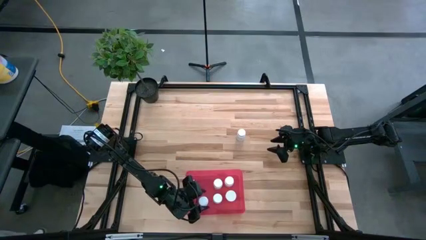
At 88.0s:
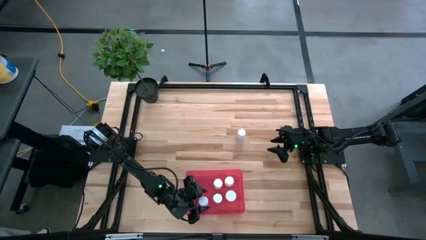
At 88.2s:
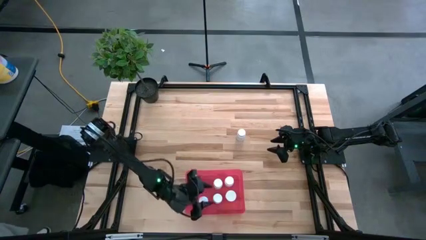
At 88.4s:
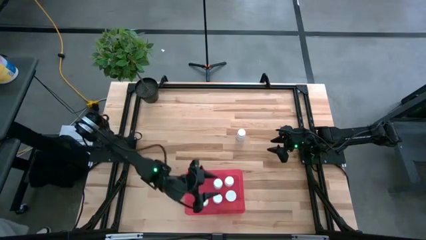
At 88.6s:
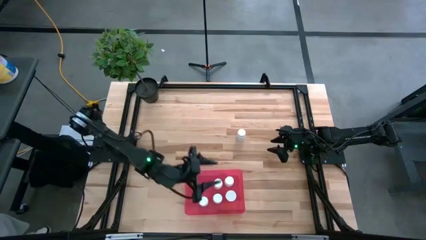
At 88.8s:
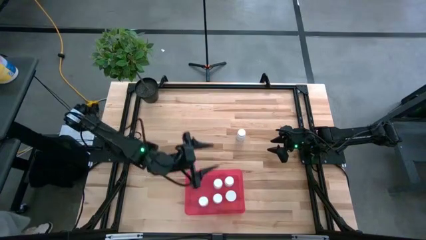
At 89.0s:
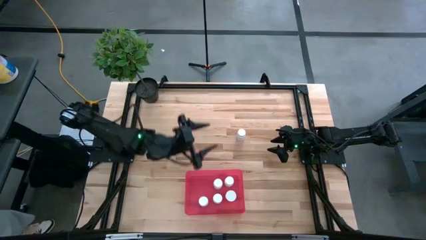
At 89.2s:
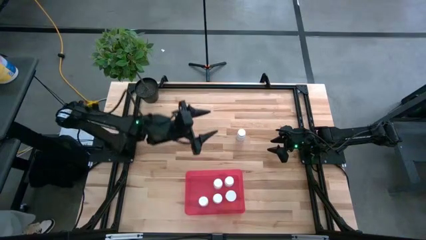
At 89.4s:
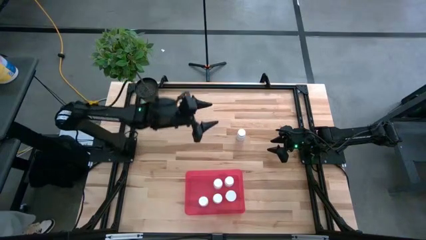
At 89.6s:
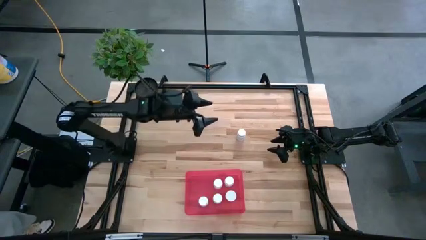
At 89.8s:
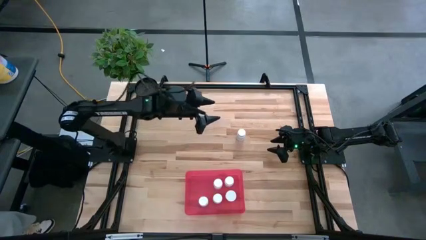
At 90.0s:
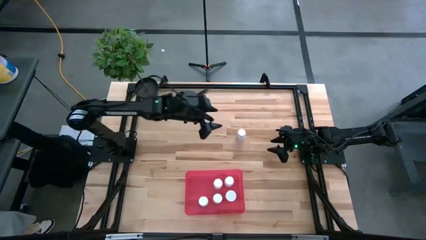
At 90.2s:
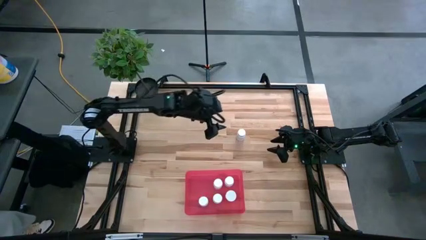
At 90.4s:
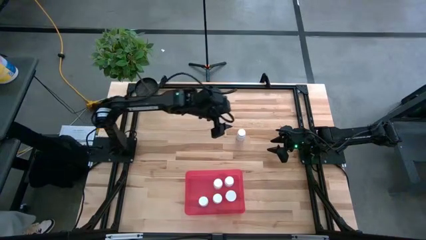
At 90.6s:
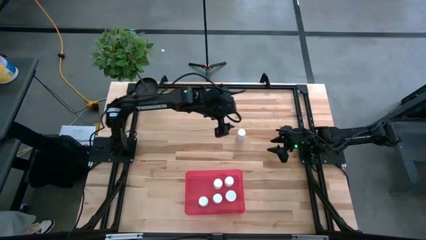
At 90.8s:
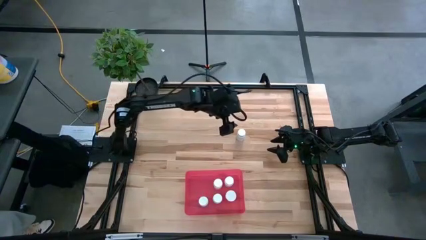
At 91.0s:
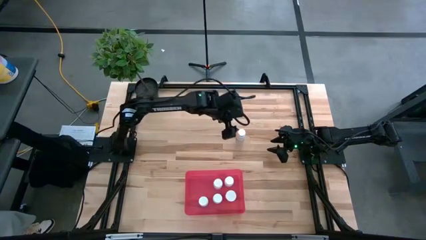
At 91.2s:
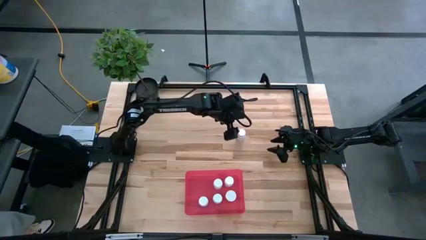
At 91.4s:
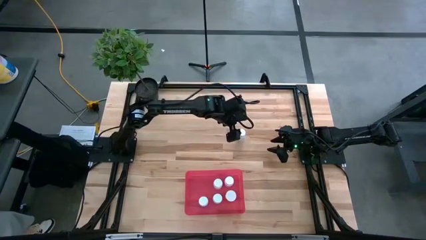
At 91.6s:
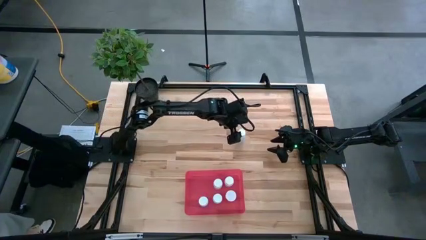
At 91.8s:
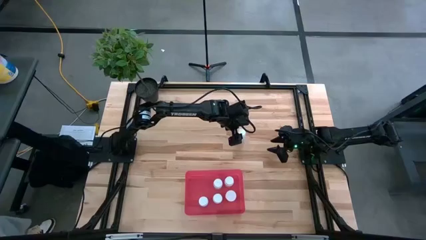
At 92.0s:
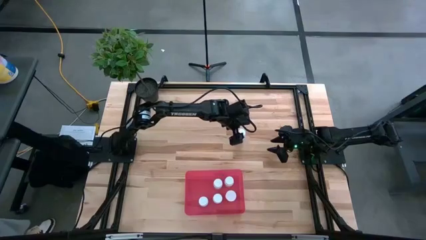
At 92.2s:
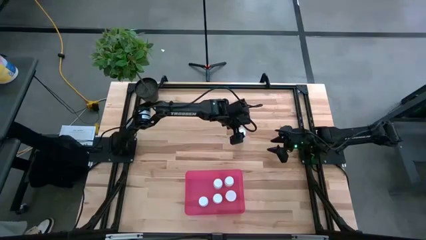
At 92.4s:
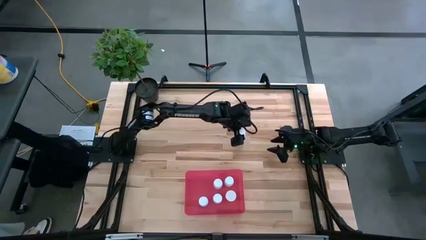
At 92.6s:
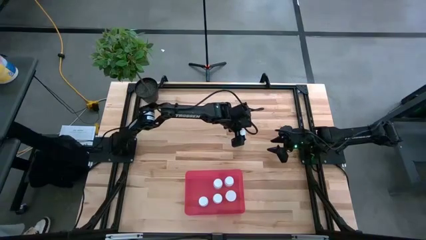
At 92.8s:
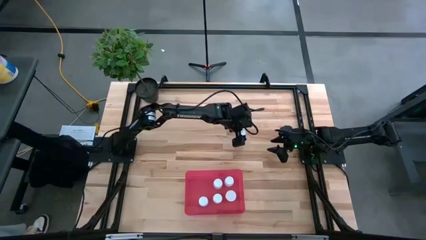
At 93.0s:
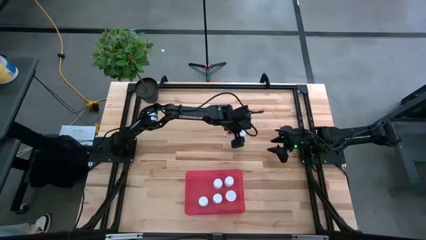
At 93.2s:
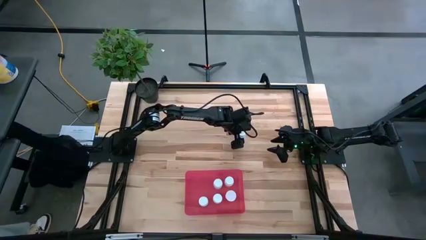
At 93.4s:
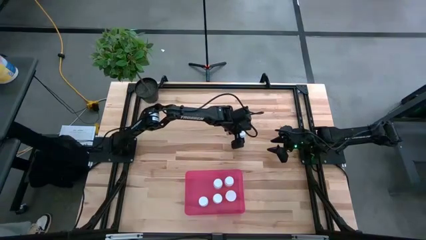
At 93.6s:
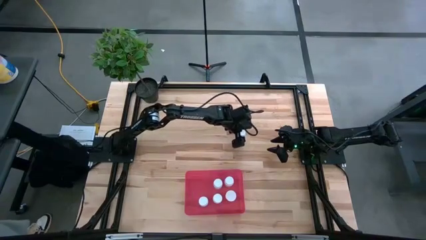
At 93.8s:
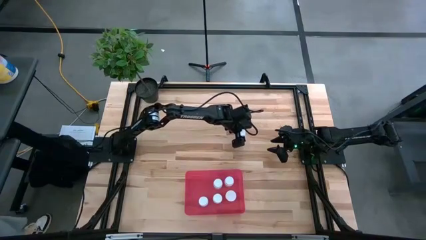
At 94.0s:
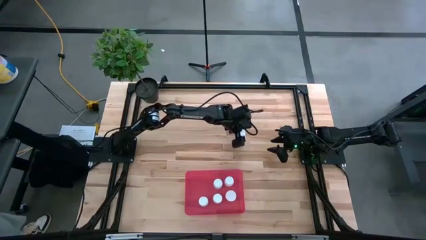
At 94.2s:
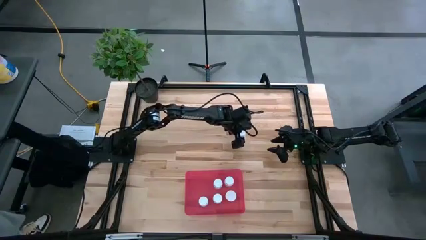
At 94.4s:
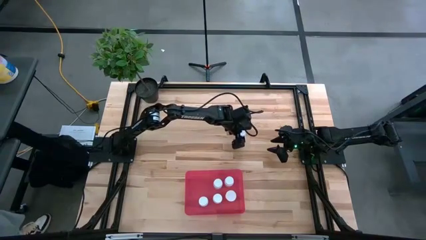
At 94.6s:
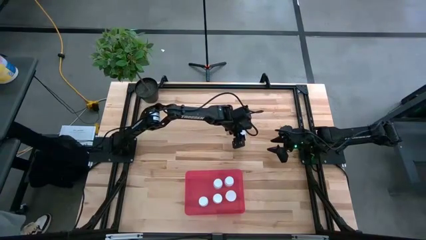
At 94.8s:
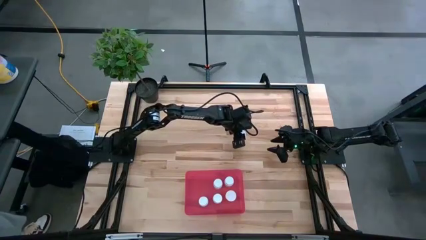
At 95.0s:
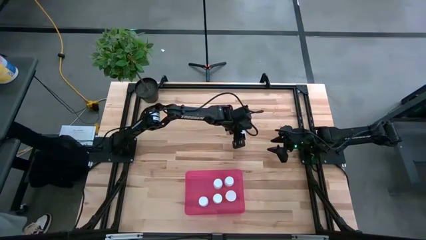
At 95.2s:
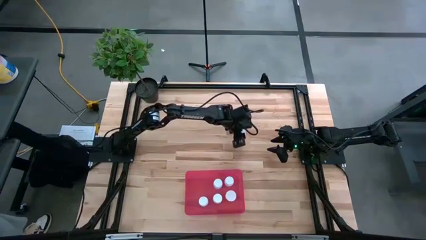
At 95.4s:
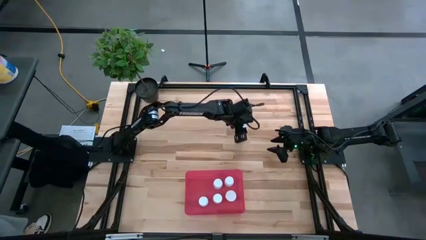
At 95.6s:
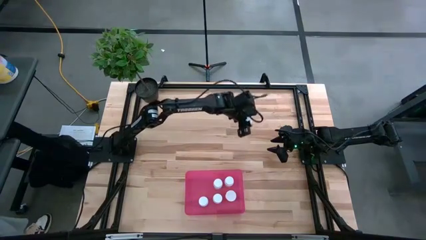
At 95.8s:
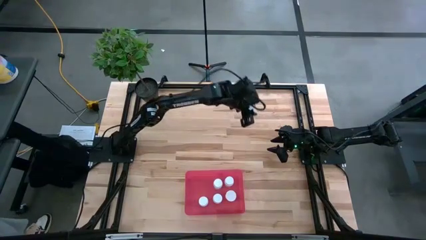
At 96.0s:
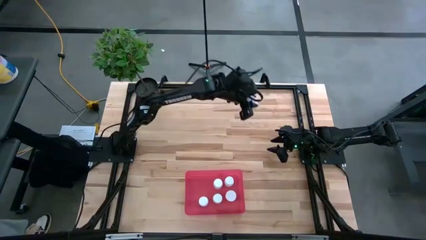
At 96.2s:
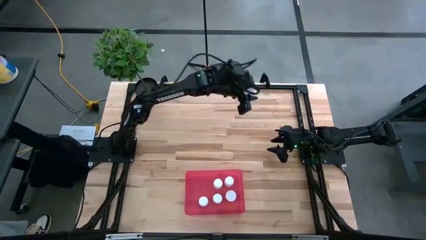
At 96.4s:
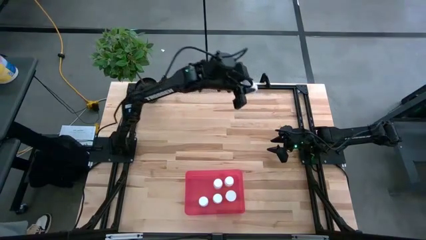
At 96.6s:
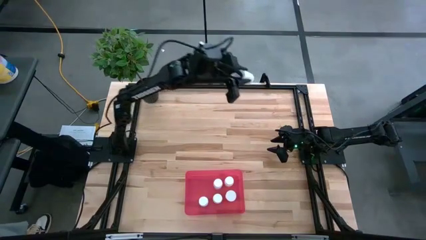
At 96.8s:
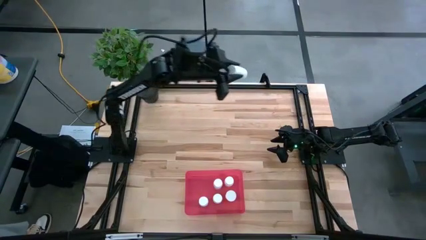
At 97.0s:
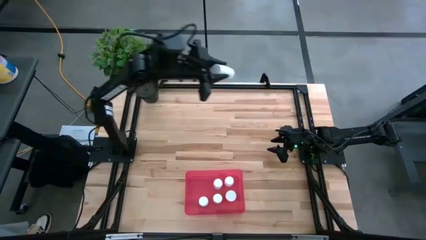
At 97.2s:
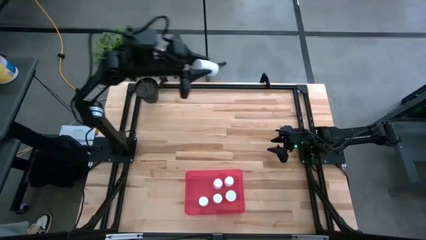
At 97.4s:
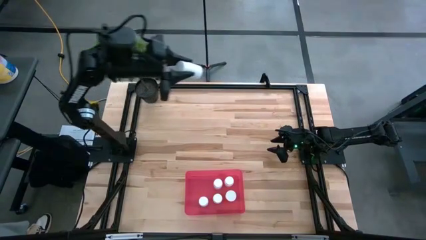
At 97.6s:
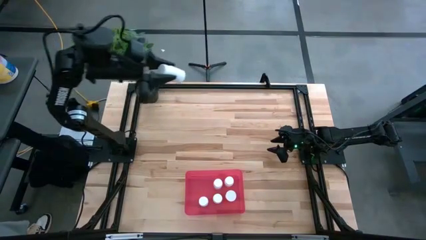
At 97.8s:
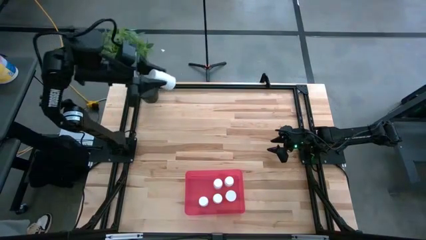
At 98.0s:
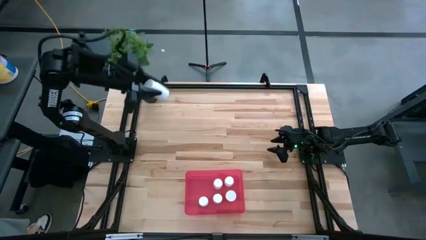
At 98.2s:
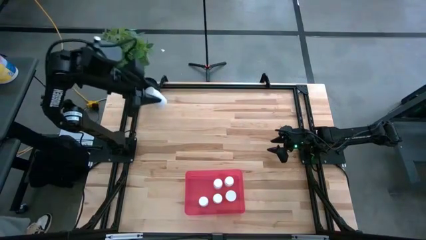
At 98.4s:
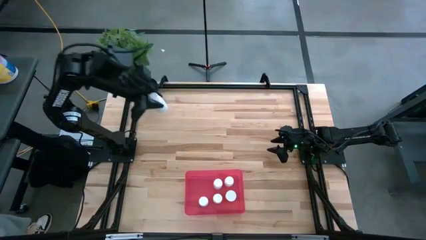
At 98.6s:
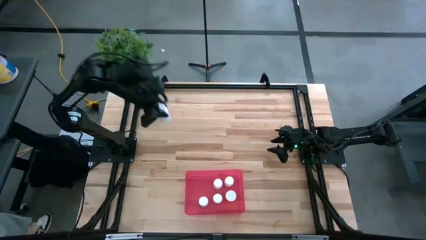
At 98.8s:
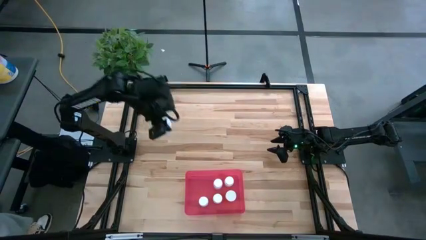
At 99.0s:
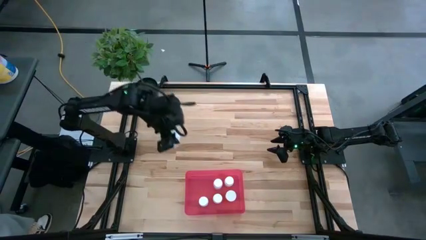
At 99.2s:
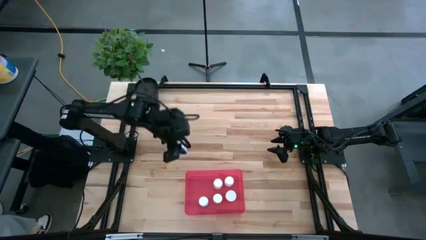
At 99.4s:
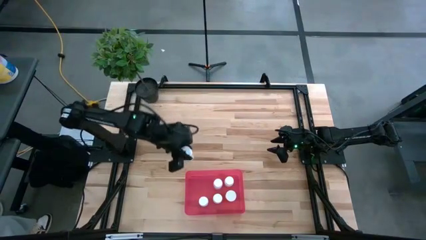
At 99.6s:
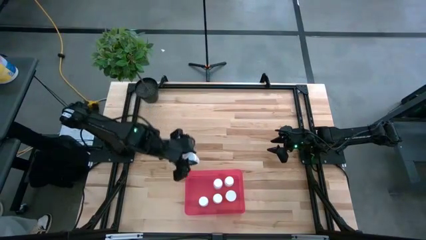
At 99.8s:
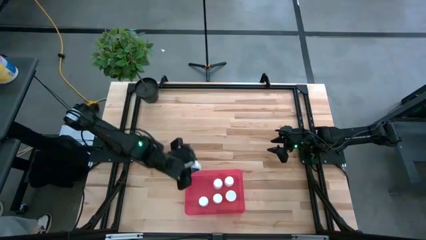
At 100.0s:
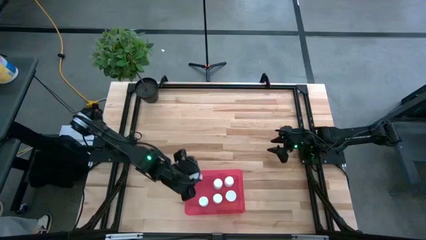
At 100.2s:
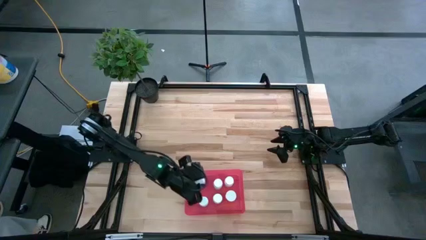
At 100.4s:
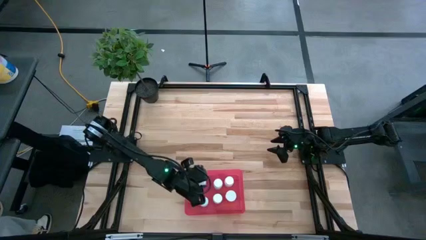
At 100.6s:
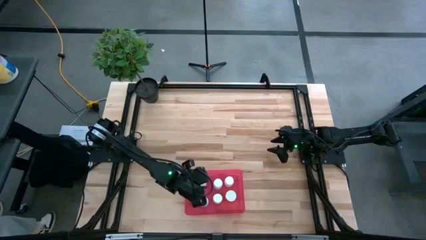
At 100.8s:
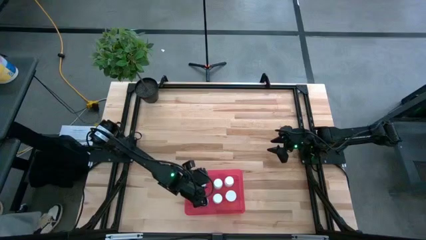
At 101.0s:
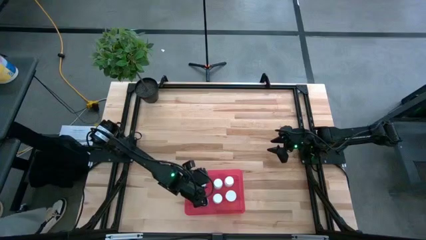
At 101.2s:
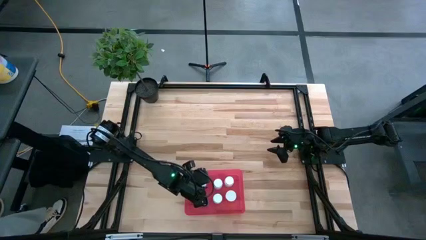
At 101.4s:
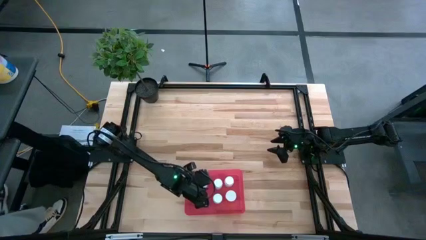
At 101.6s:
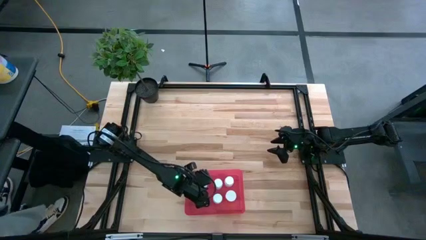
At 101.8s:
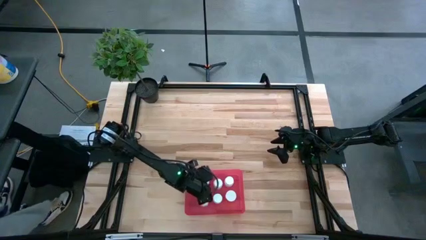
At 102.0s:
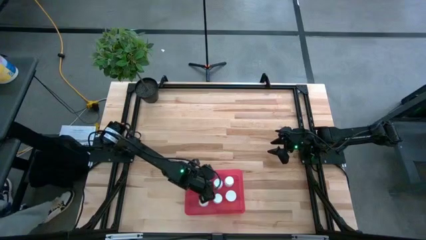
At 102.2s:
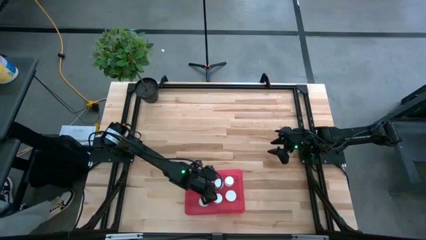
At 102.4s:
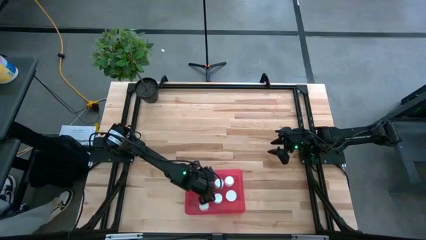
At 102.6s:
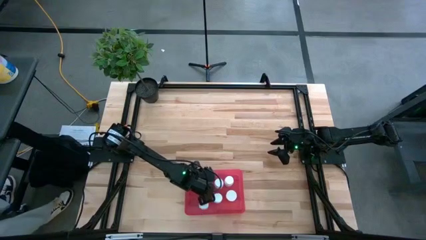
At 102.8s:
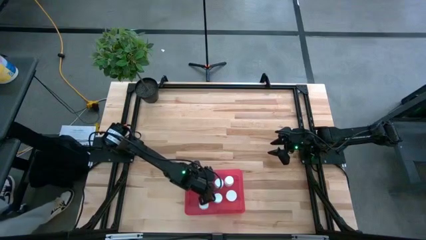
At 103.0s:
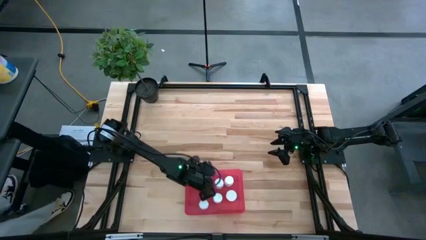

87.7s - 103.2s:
Task: Pick and place pill bottles into a basket
Put the white pill bottle into the pink bin

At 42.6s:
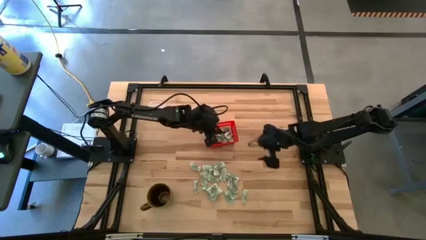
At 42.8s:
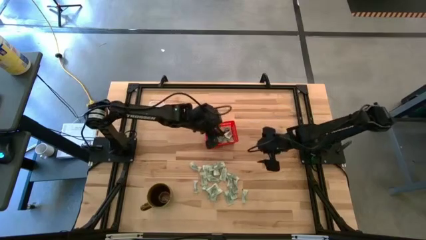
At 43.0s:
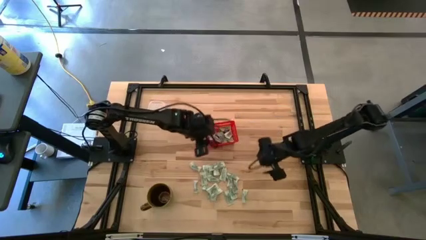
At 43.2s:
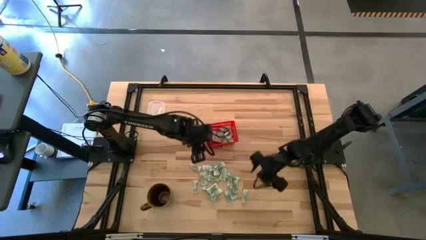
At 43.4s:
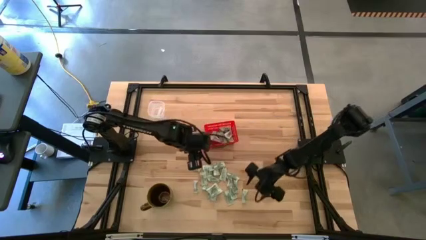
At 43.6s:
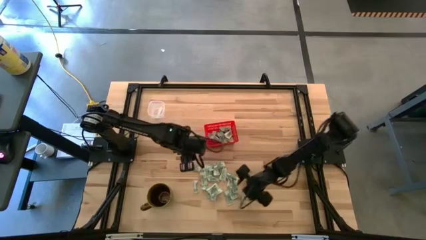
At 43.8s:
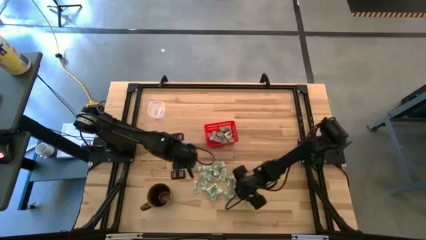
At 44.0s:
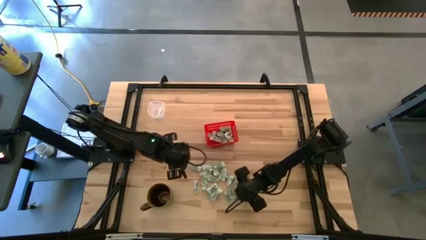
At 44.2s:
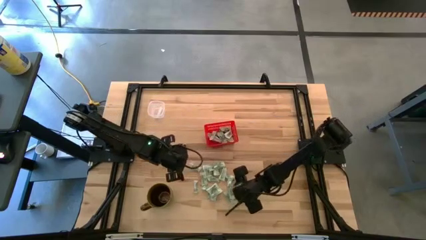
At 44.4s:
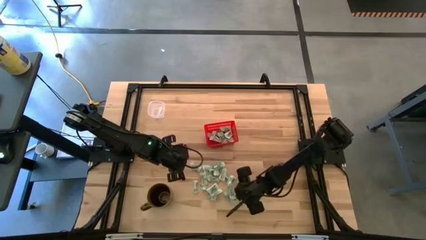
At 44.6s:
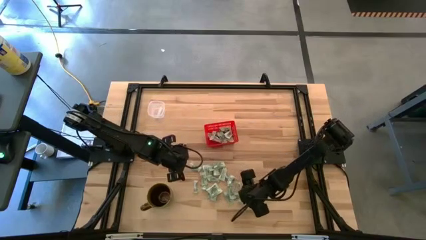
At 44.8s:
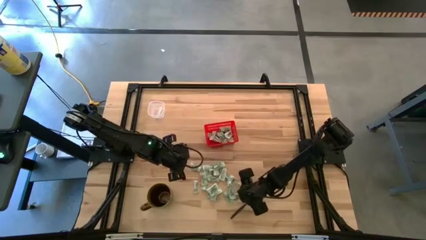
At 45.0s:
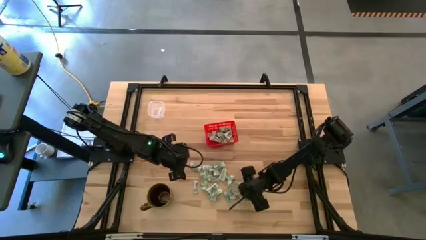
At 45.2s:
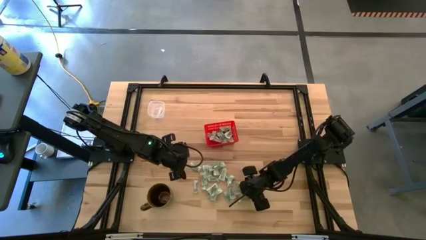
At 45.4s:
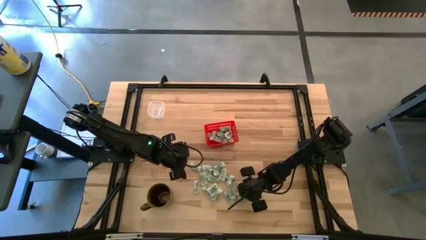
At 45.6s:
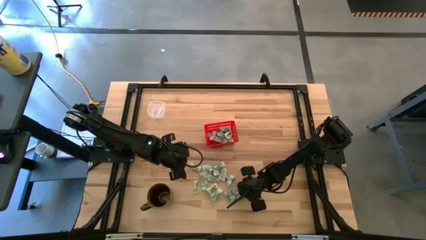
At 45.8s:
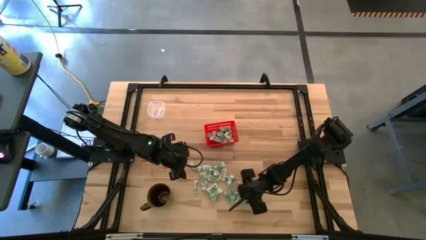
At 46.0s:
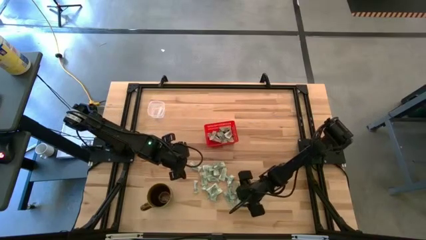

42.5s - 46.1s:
Task: Pick and place items into bin
Put the green stevia packet into the red bin
